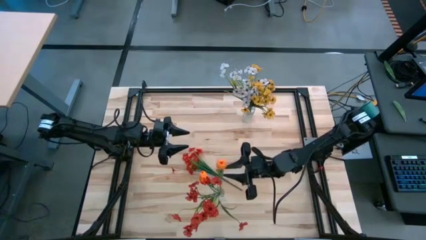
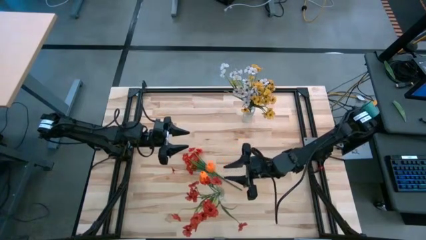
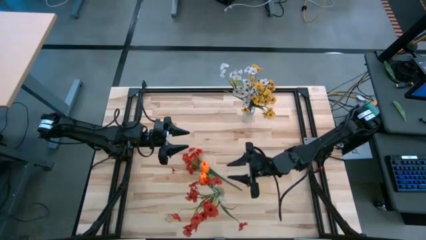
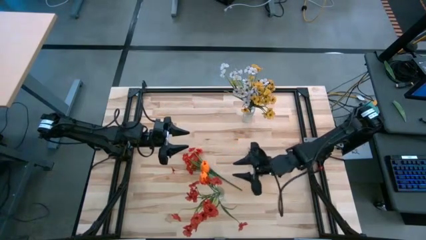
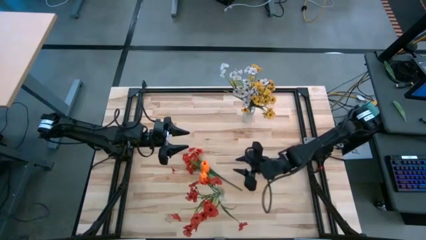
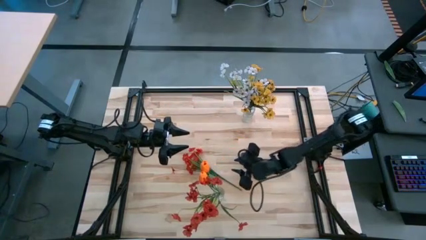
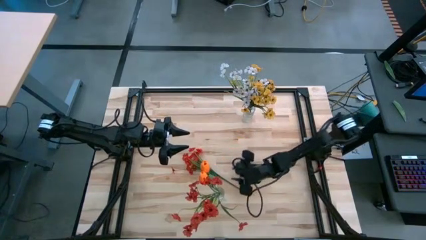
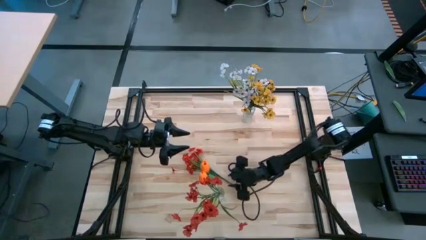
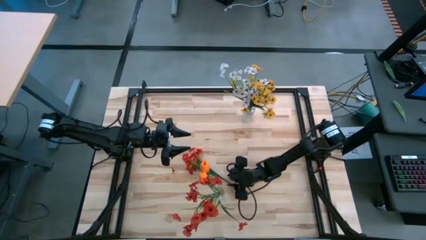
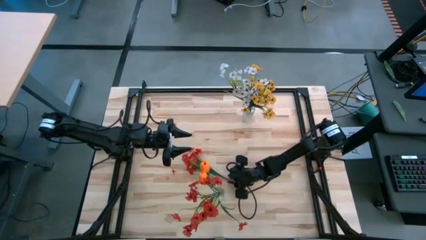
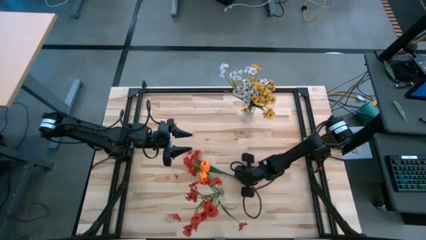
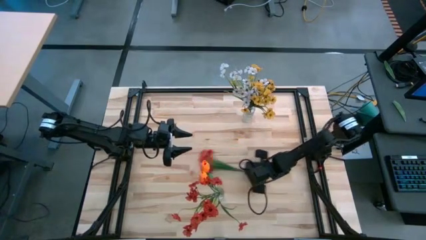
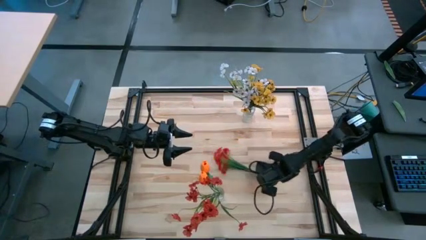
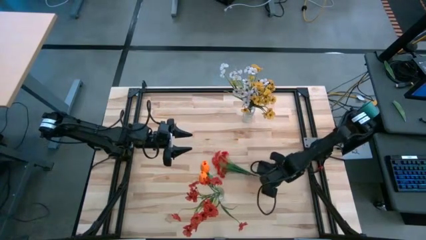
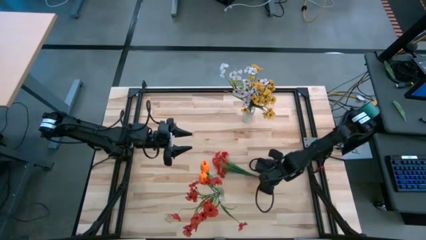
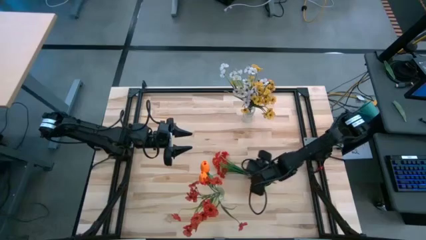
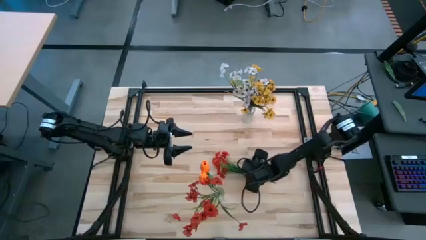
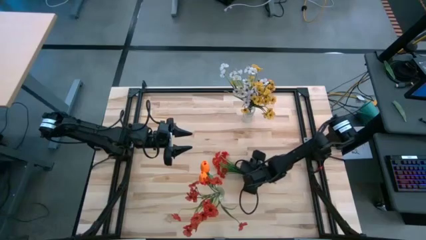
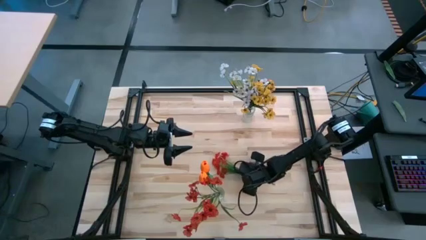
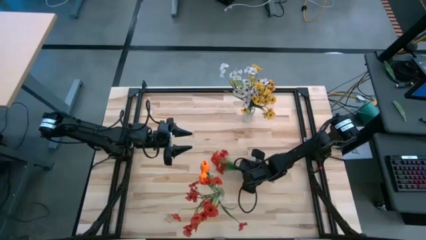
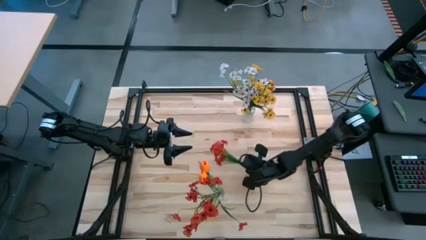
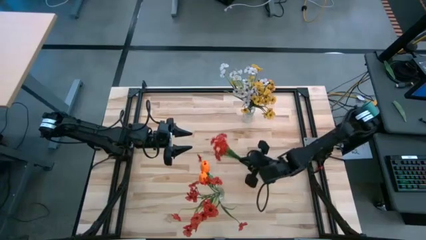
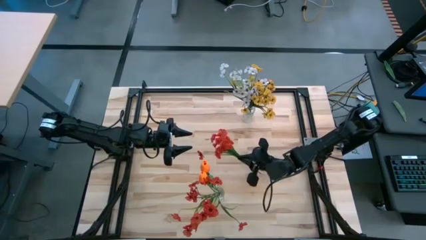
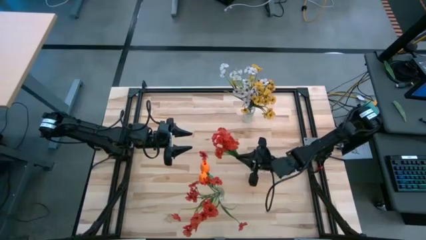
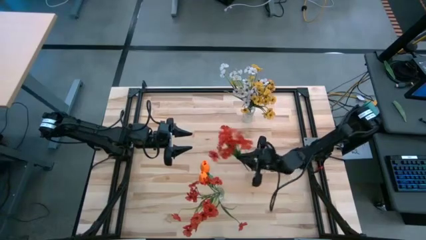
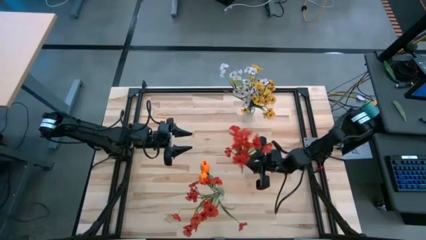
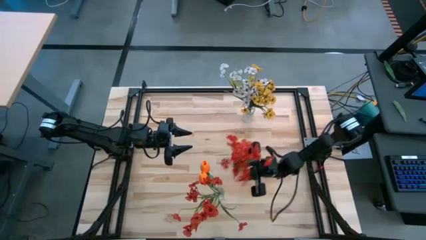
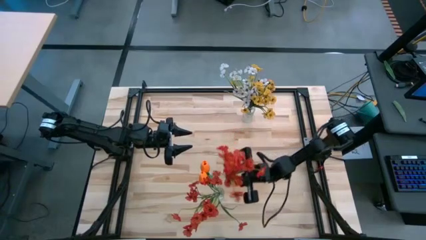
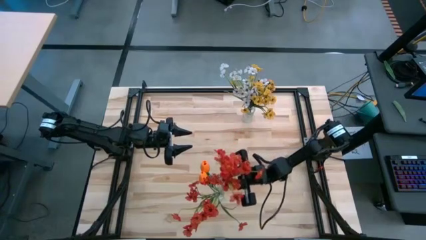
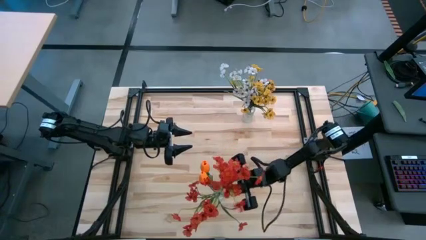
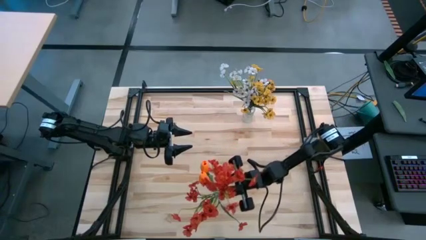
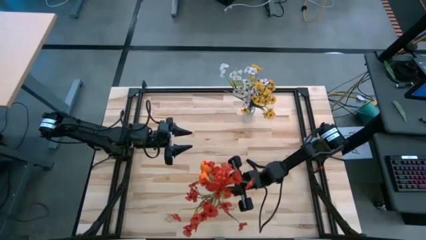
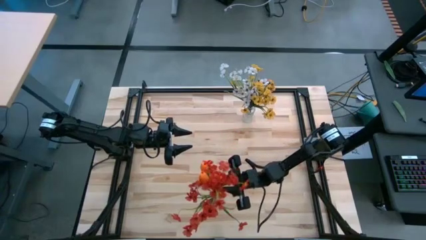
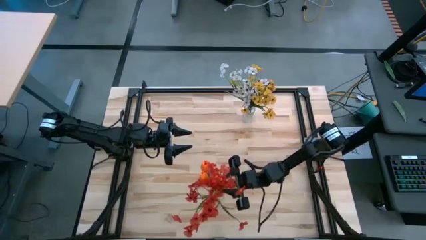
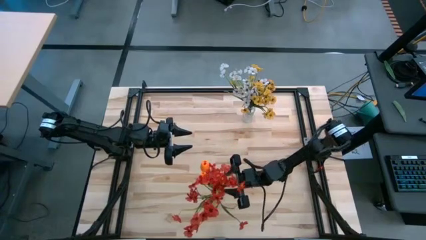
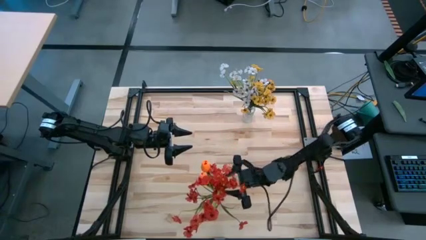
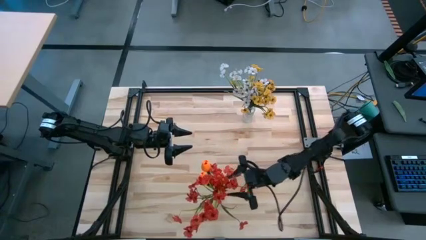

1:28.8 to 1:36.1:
Task: Sort flowers into vase by color
Put the red flowers into the bottom transparent vase

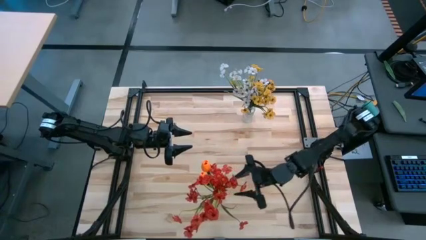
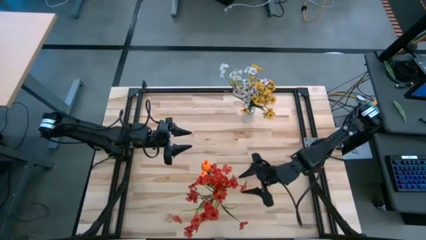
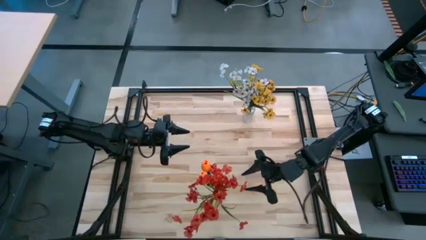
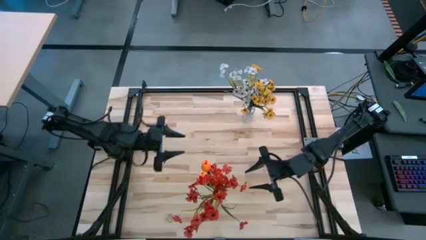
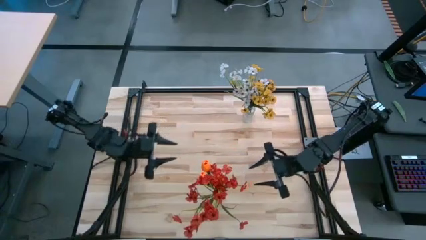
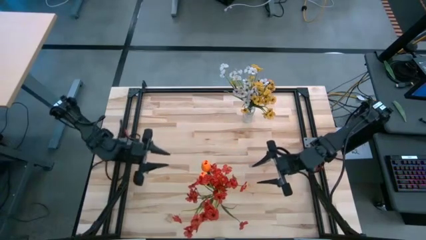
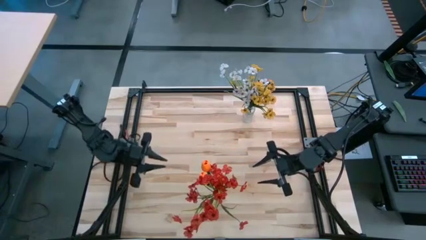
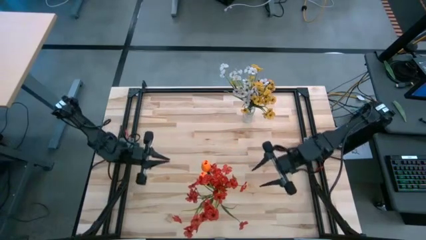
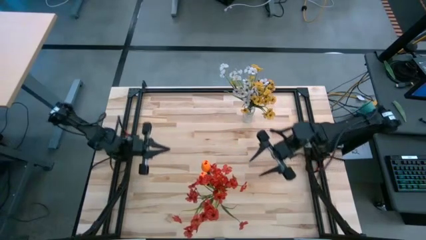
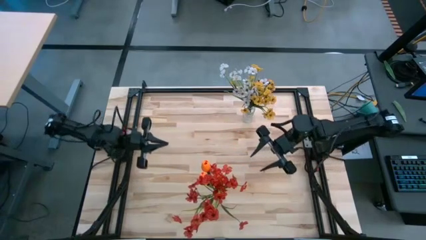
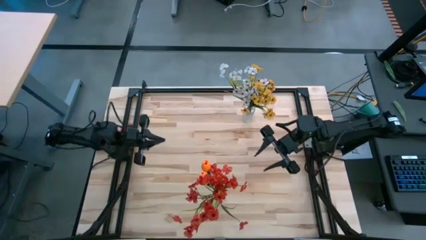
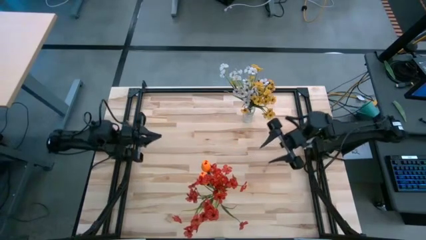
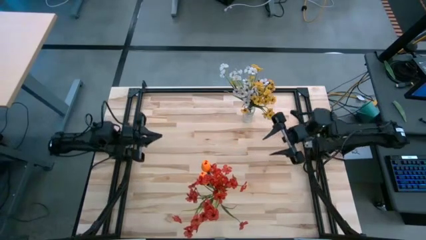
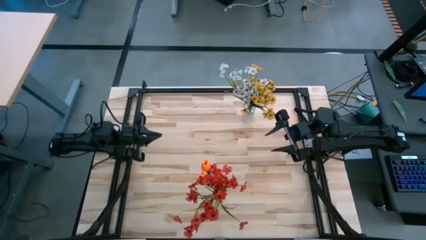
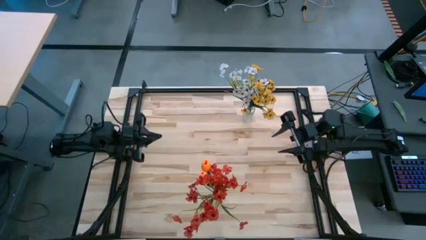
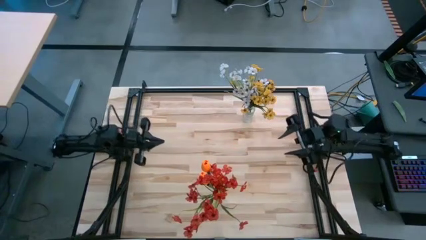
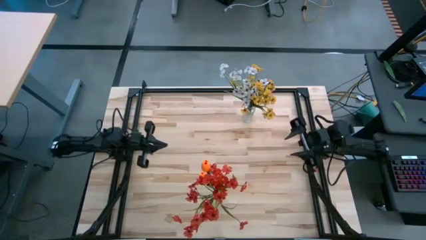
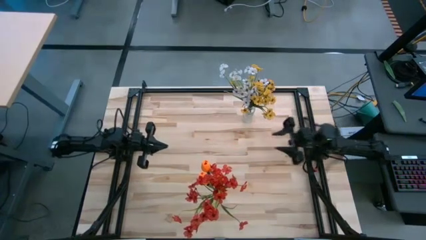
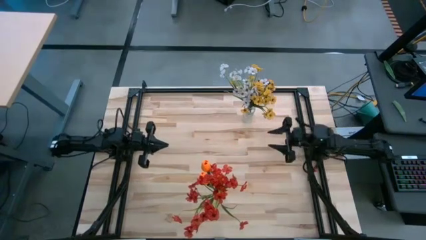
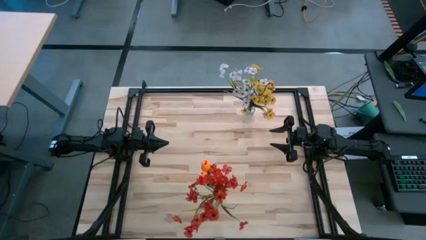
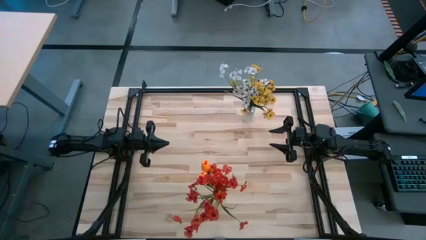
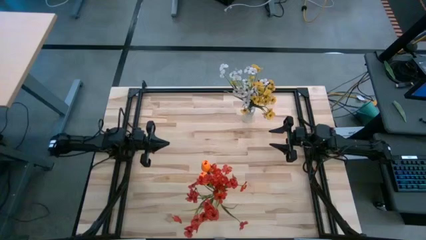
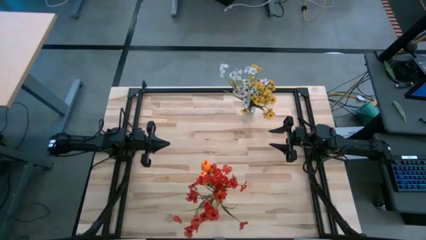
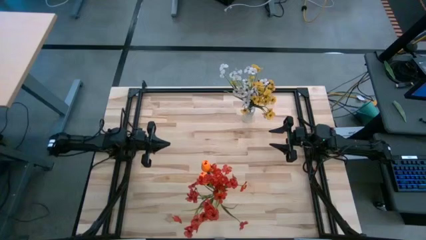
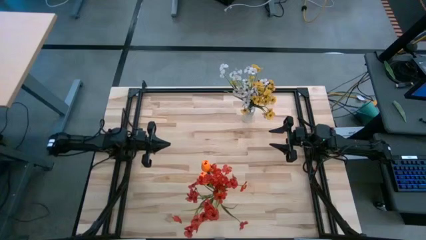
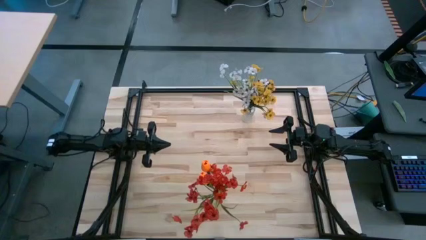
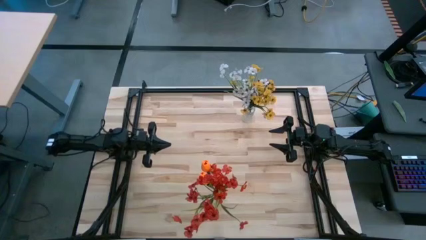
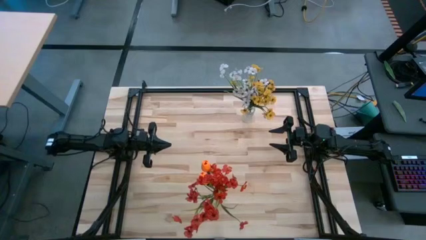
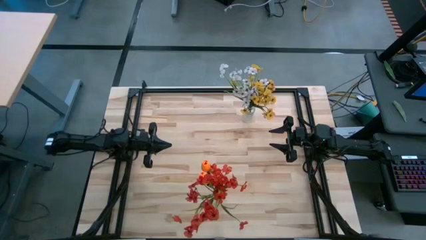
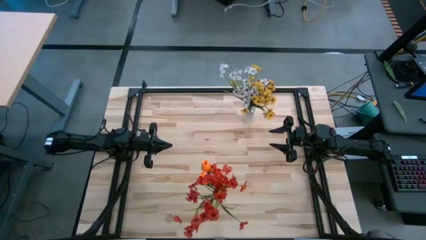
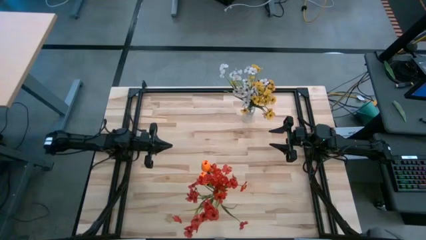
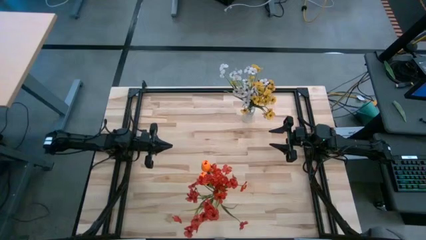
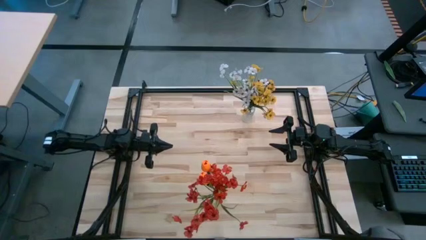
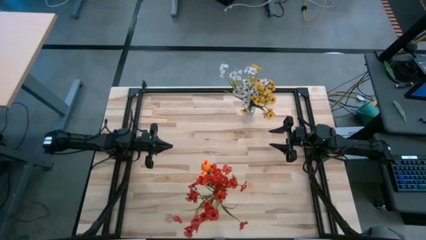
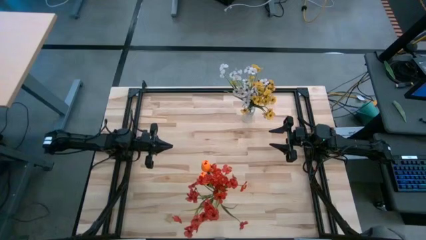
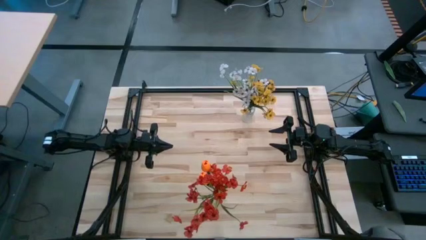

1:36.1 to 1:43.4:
Return to Home Position
